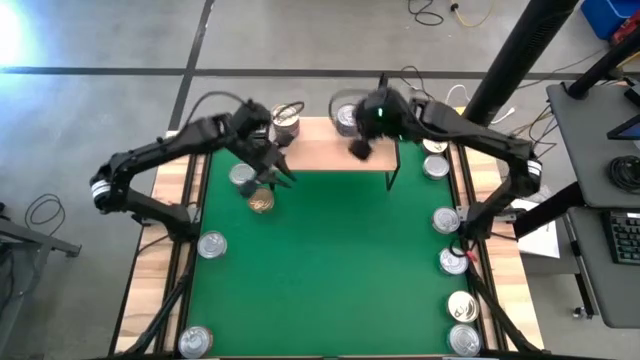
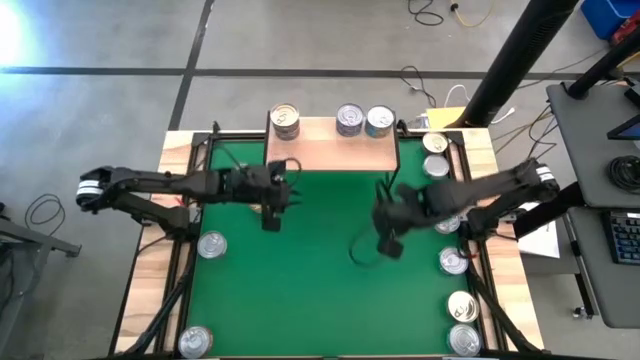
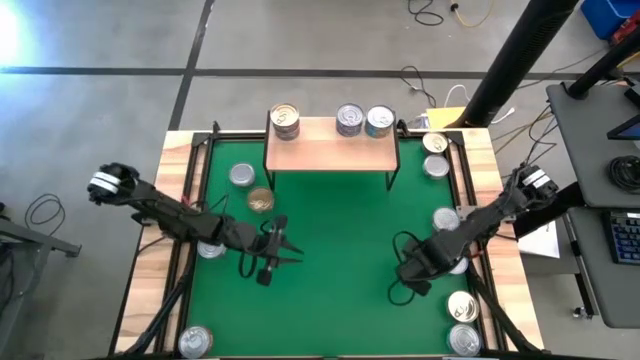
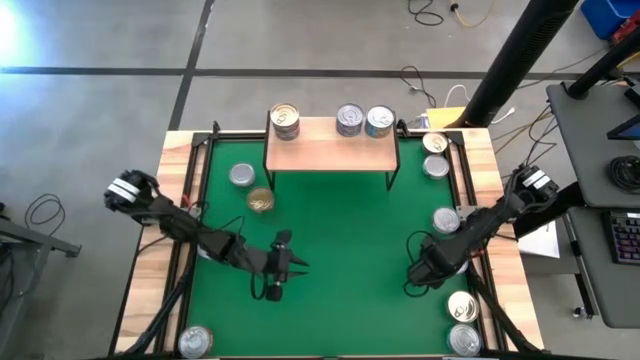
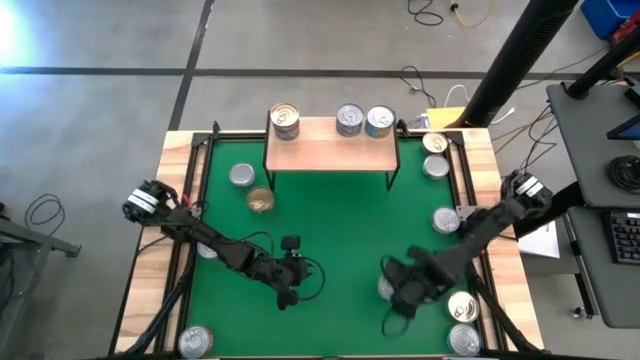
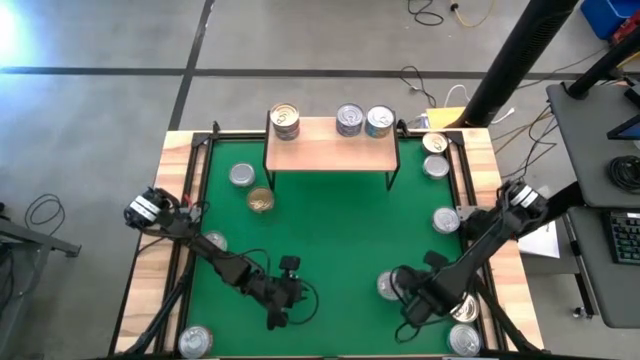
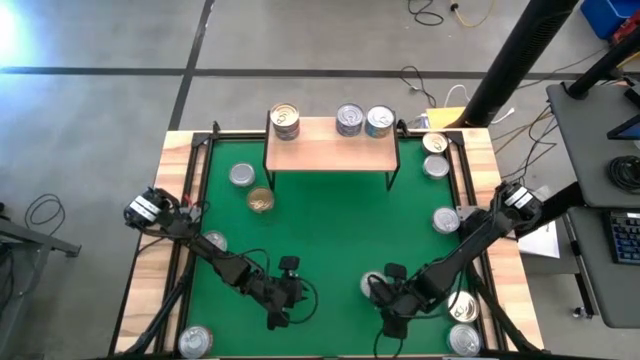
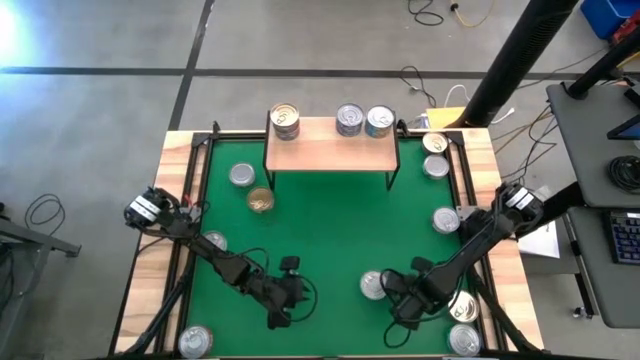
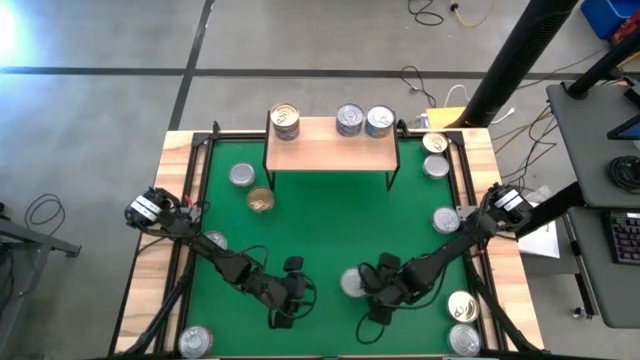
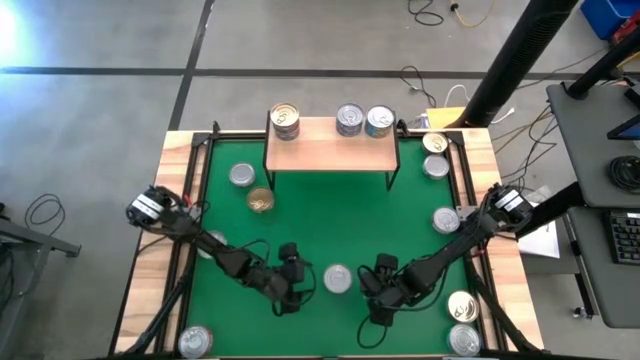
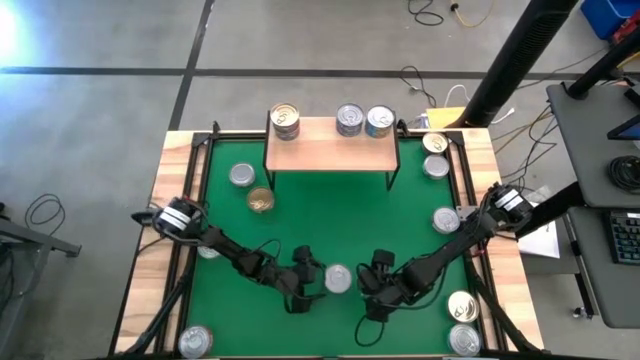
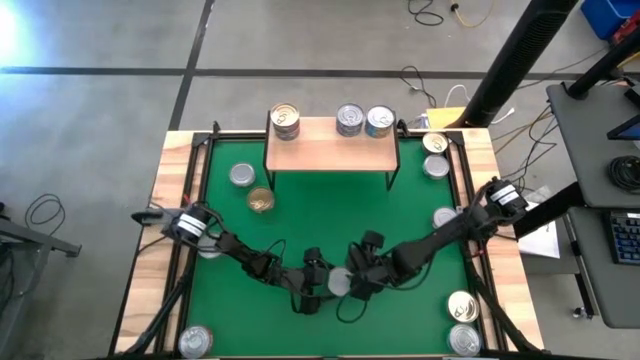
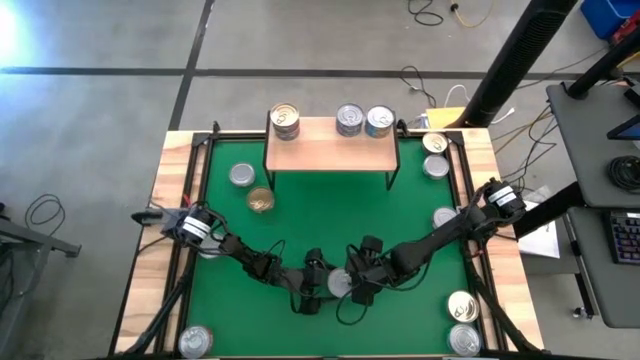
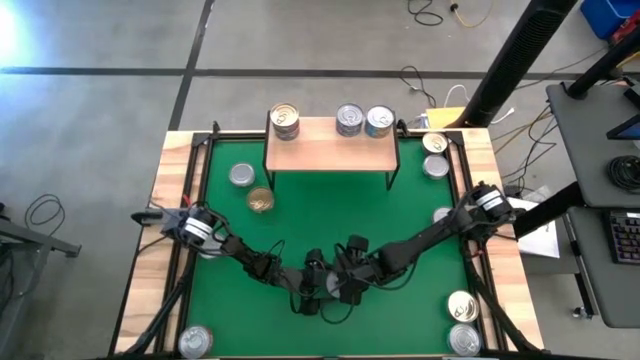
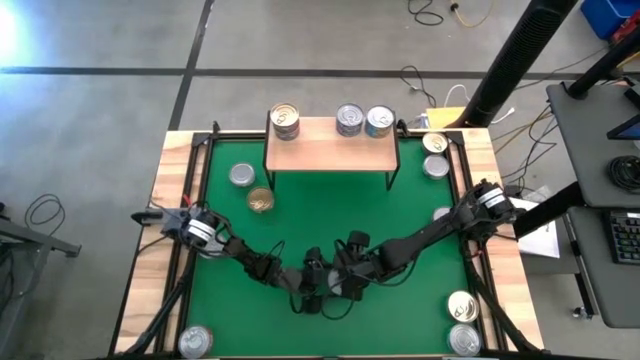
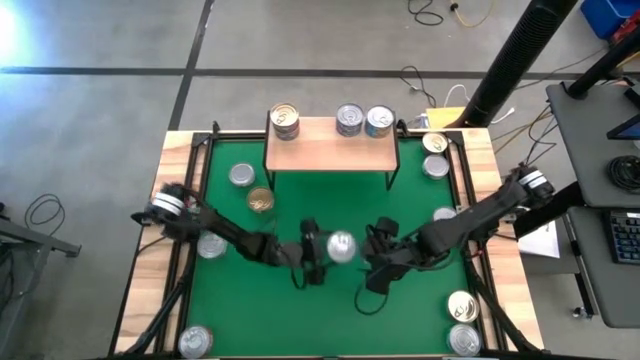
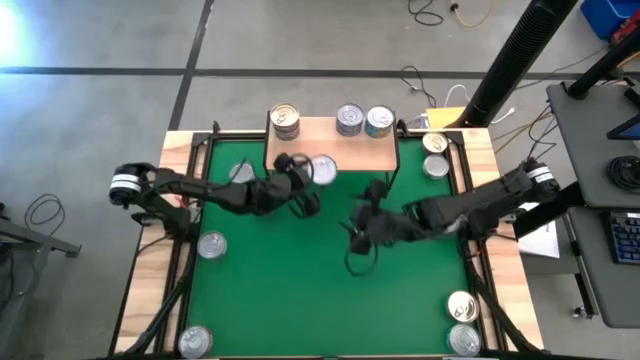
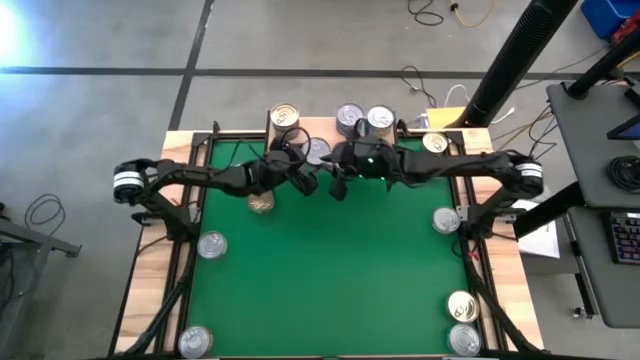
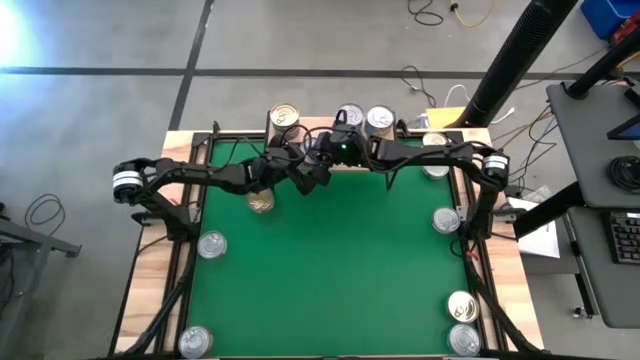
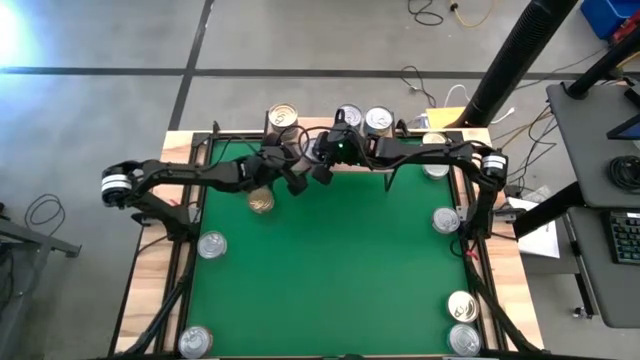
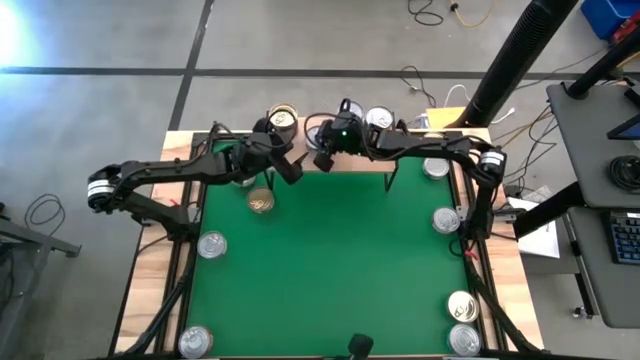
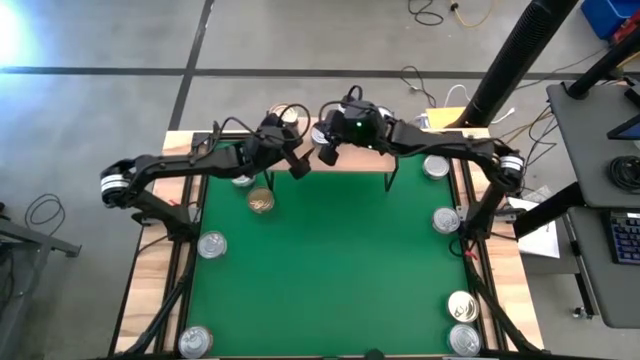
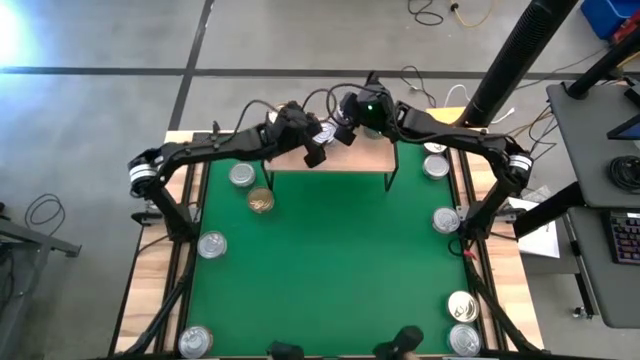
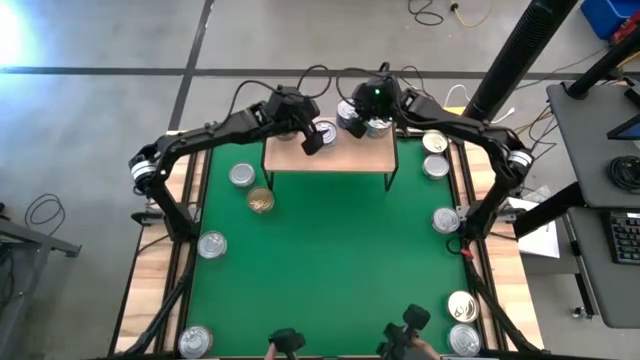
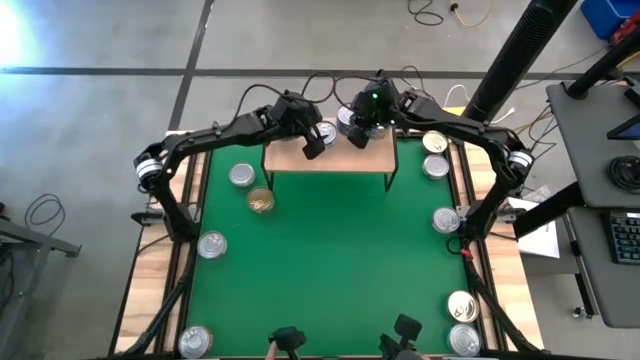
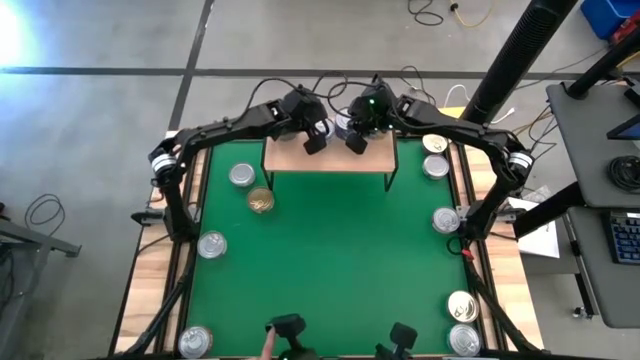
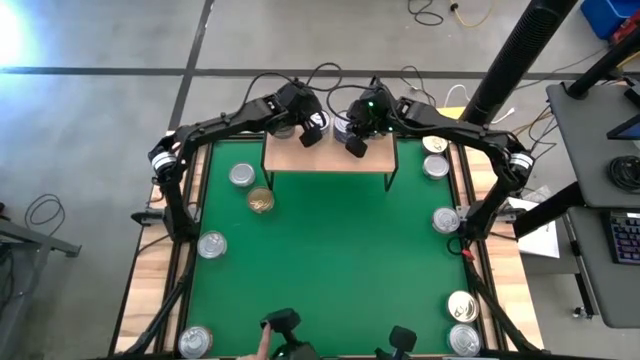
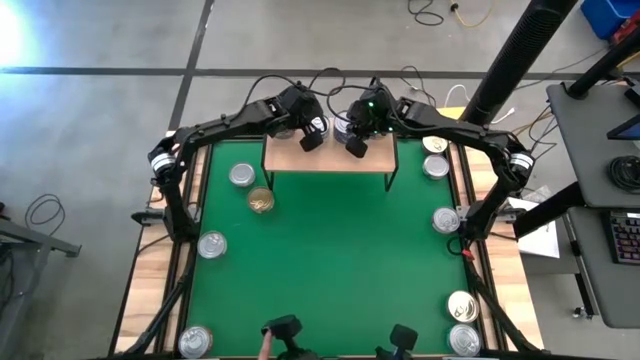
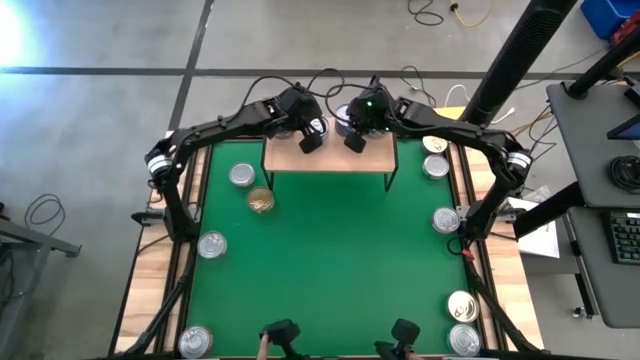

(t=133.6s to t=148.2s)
Task: Stack canned seafood by type on shelf
Put the green blue tuna can on the shelf

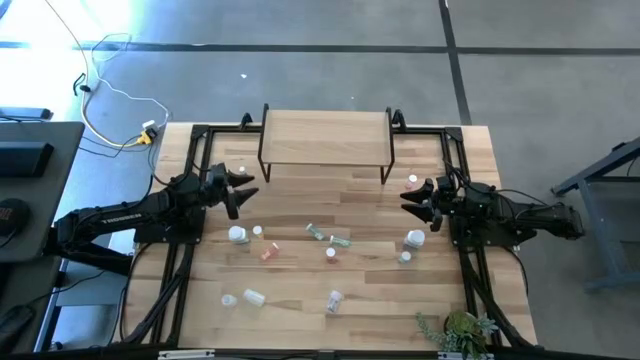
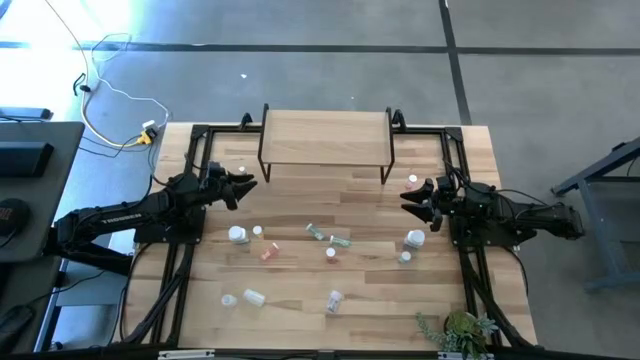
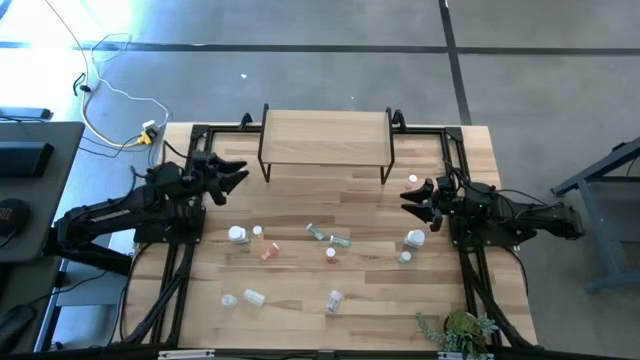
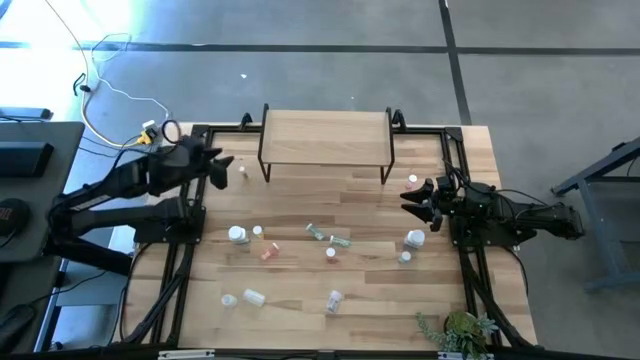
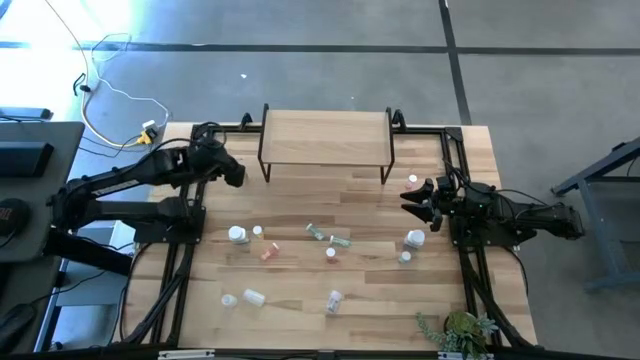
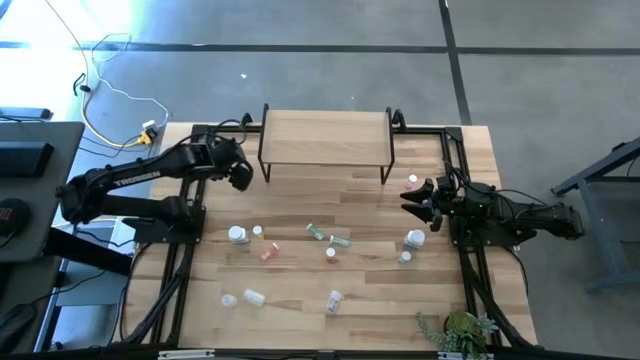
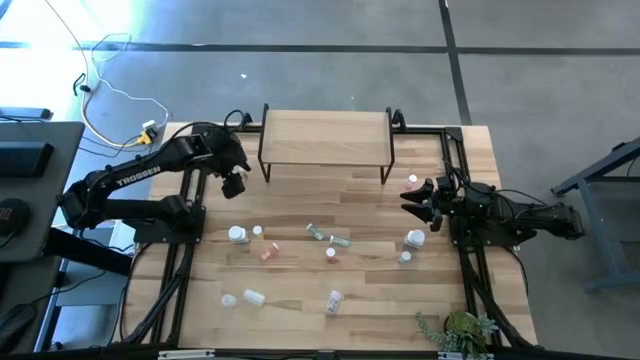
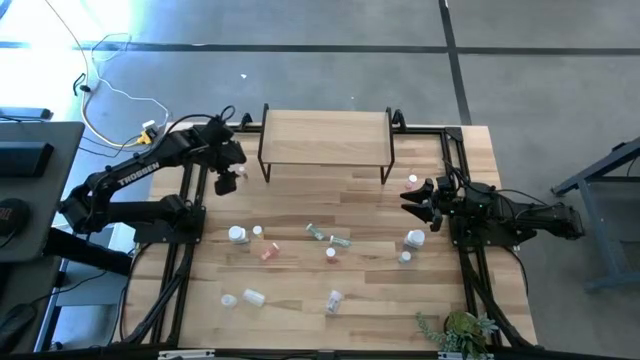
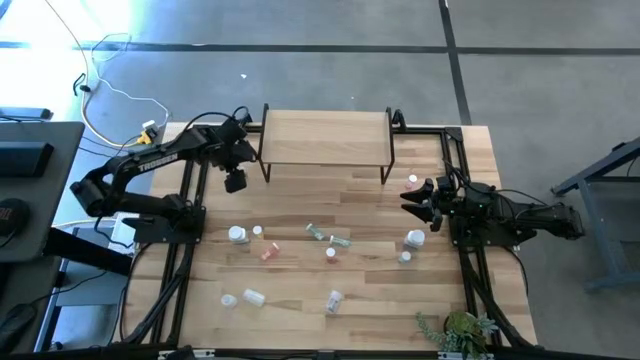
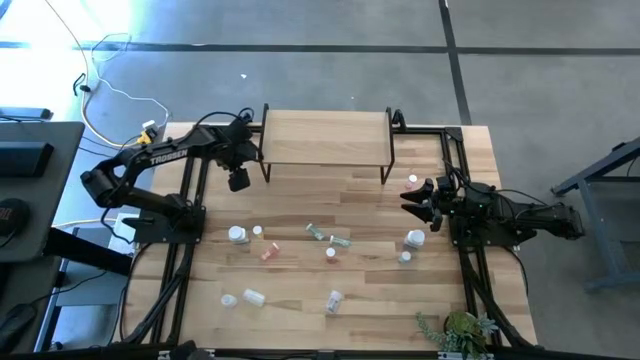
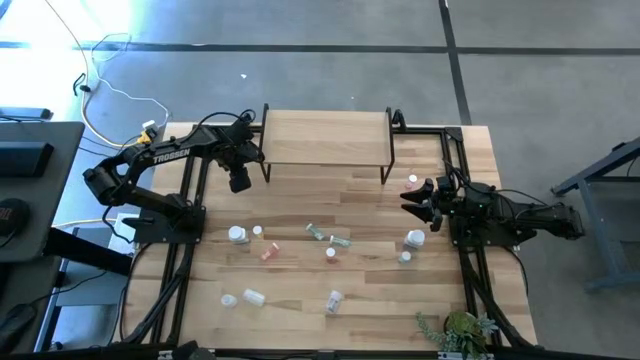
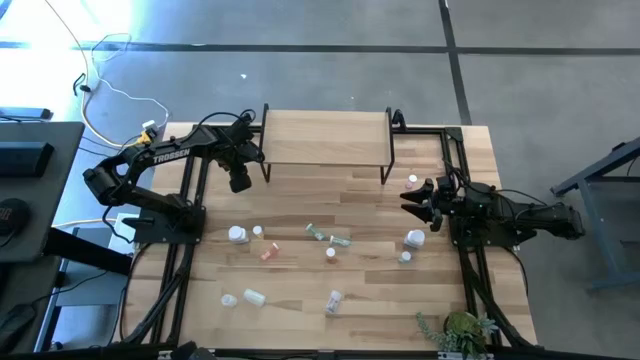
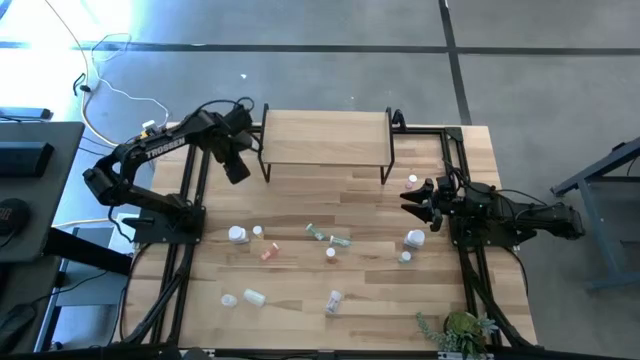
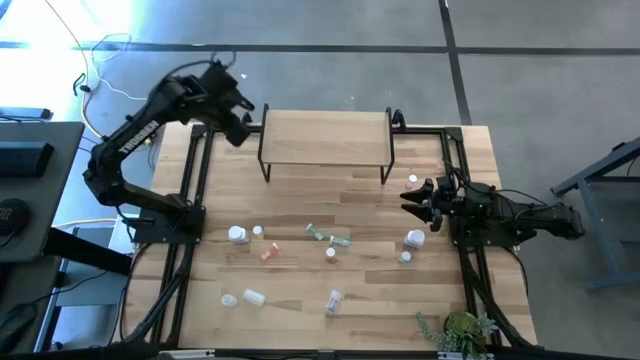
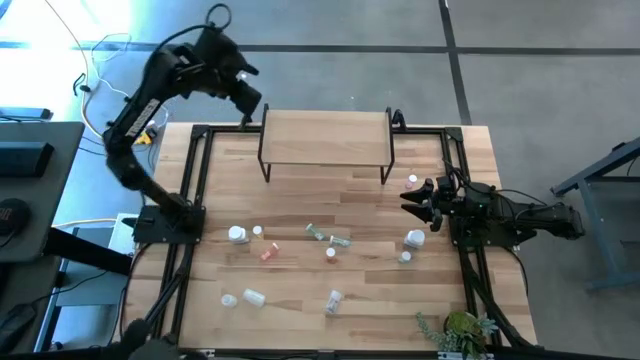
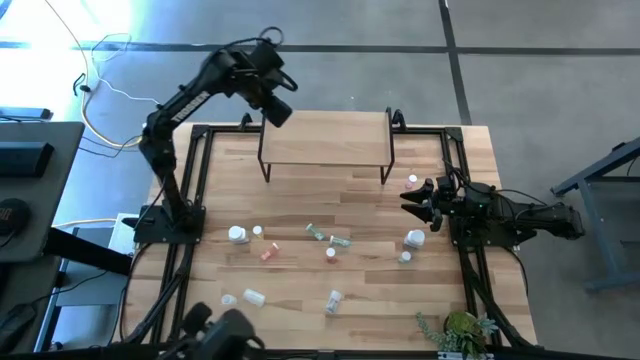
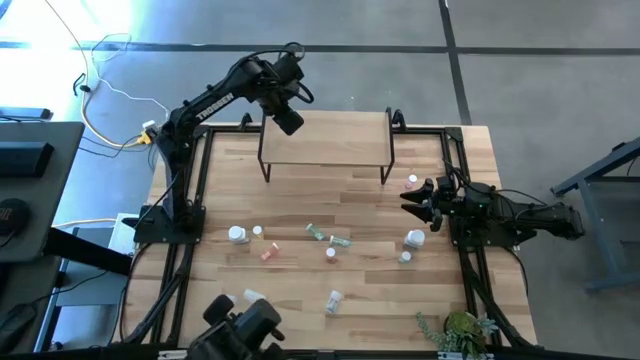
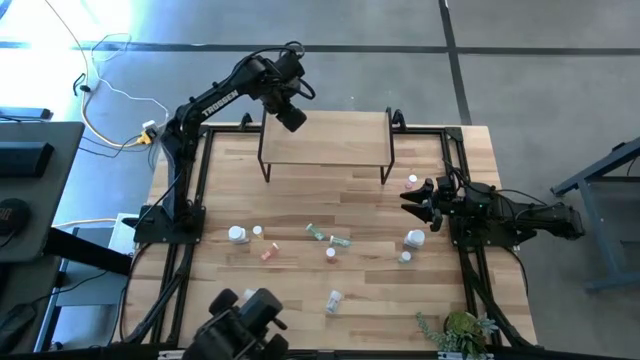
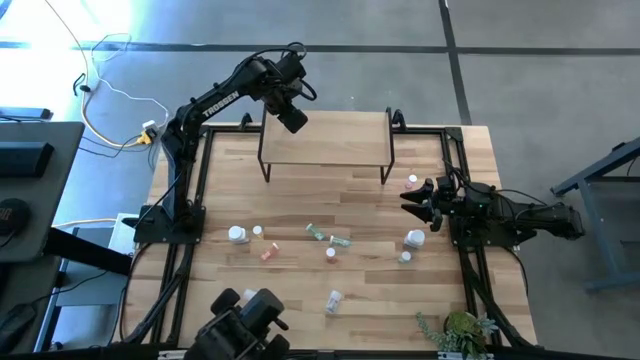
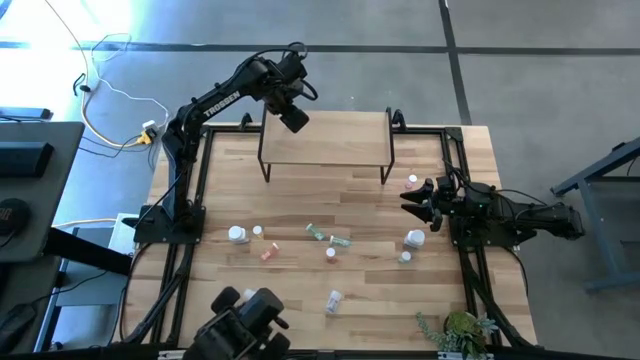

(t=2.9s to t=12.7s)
Task: Pick and place medicine bottles onto shelf by color
Put the yellow pill bottle on the shelf
